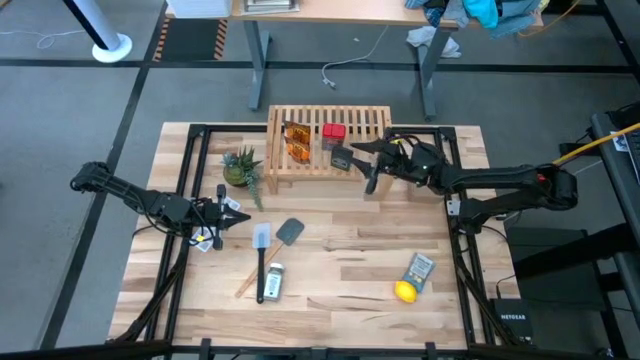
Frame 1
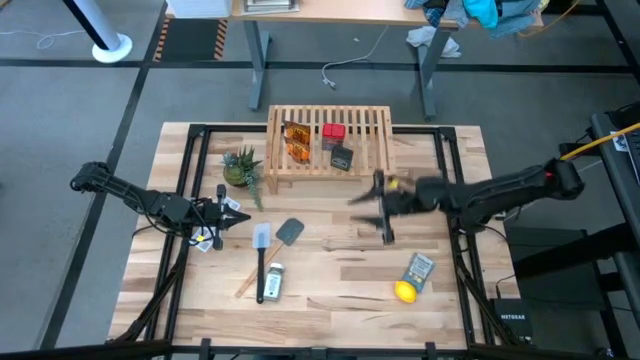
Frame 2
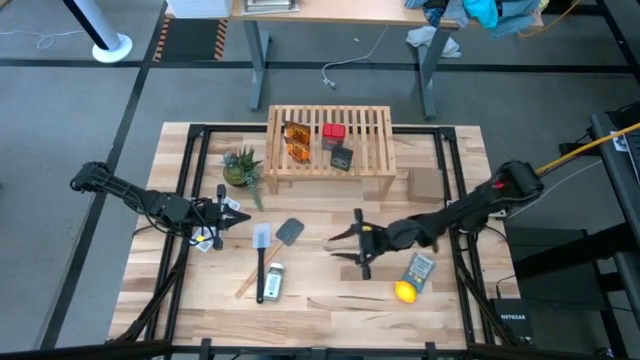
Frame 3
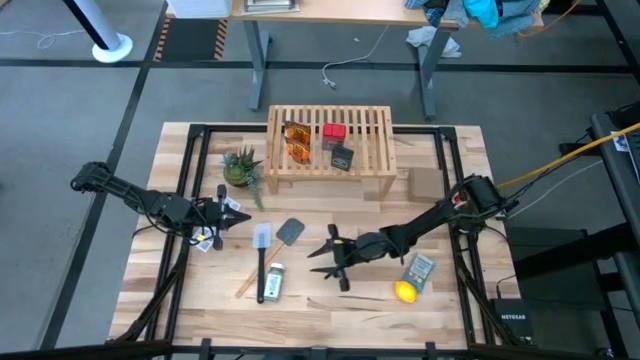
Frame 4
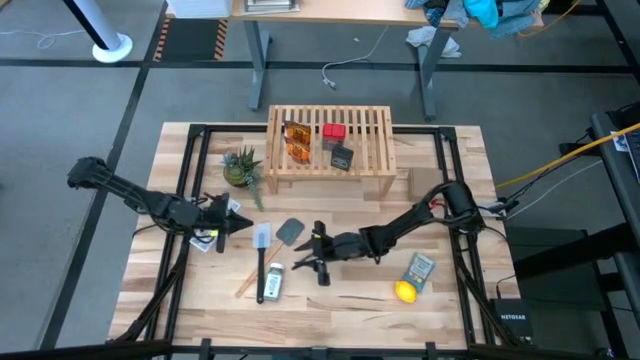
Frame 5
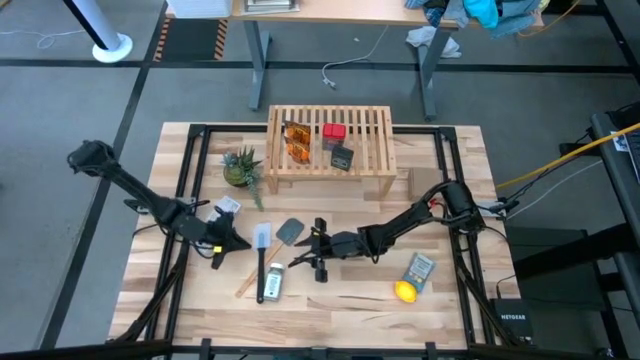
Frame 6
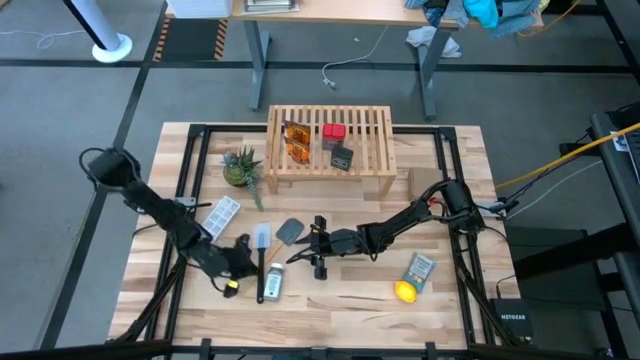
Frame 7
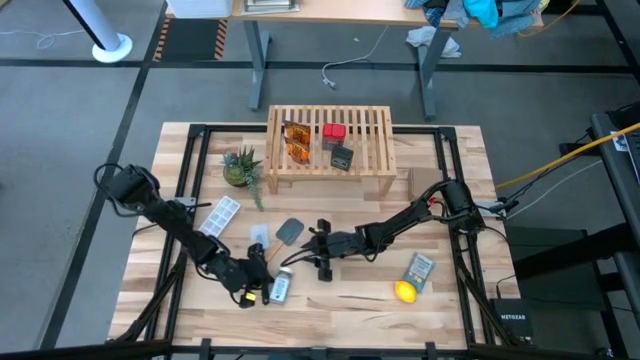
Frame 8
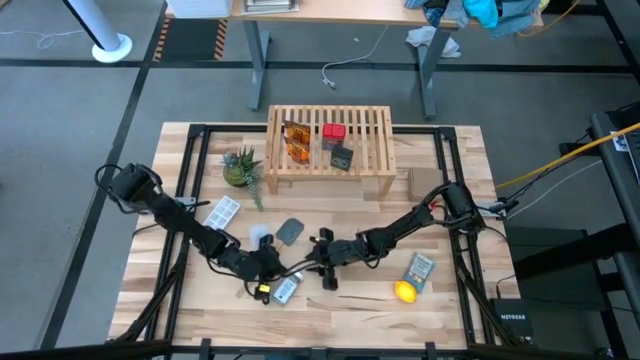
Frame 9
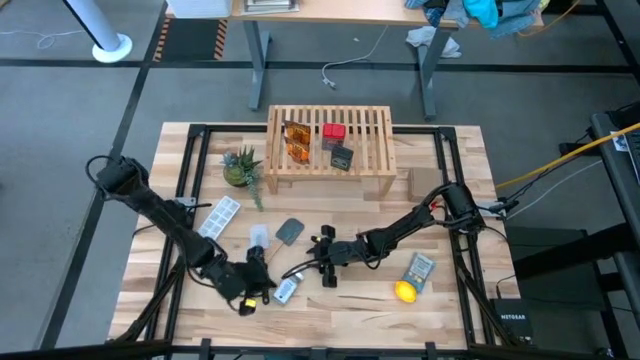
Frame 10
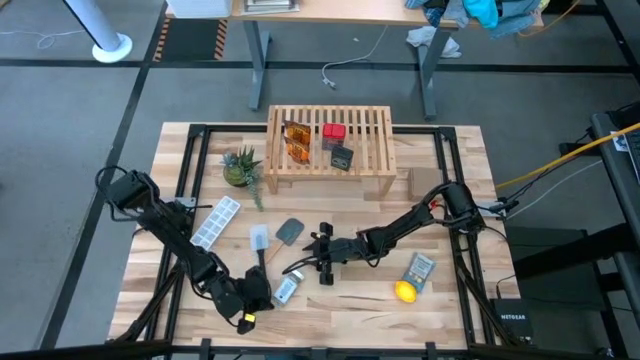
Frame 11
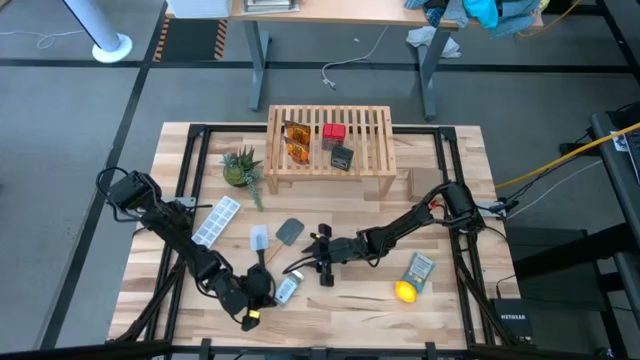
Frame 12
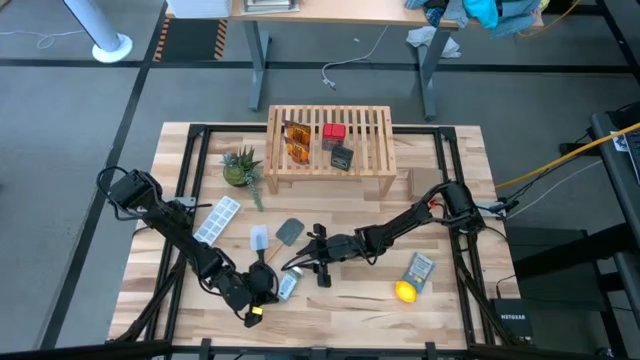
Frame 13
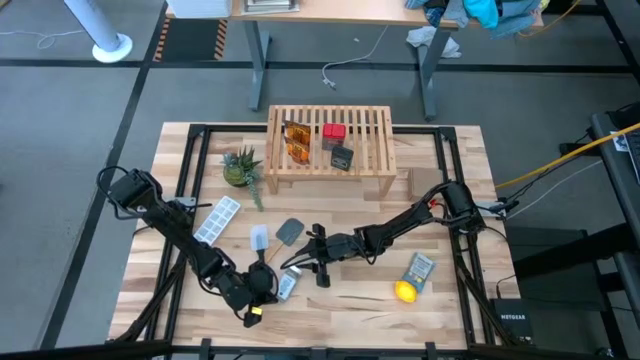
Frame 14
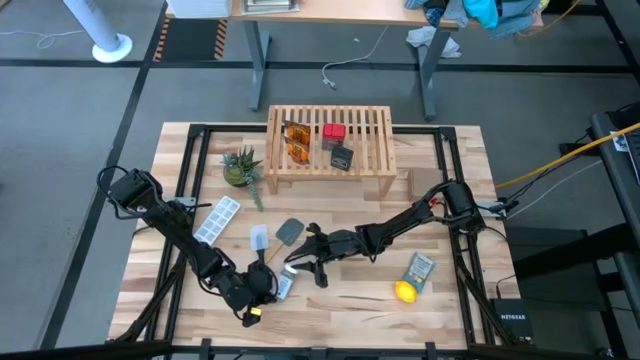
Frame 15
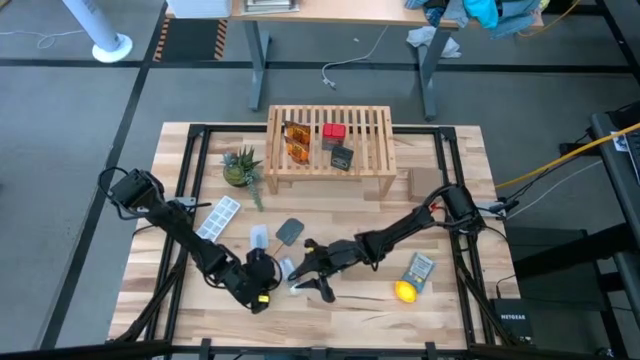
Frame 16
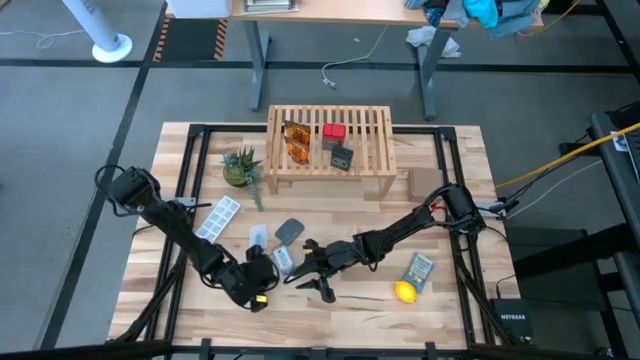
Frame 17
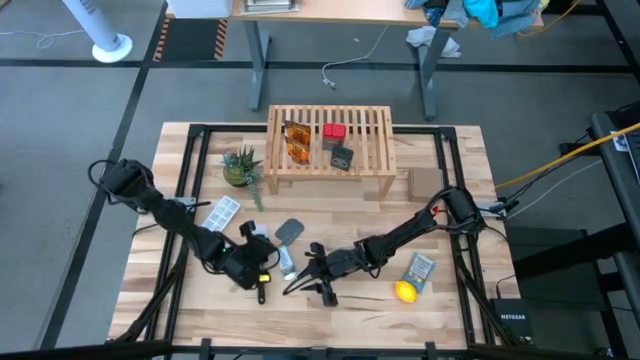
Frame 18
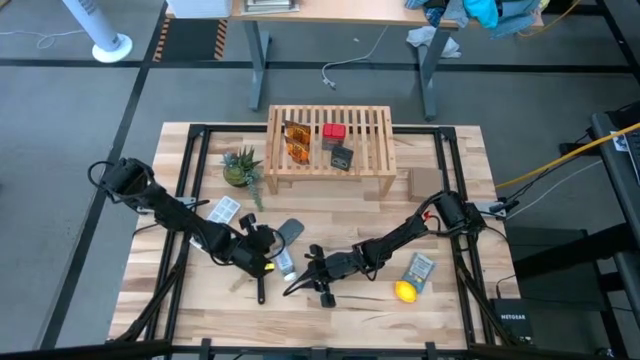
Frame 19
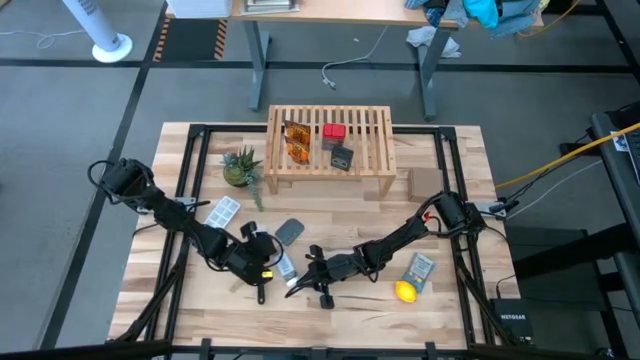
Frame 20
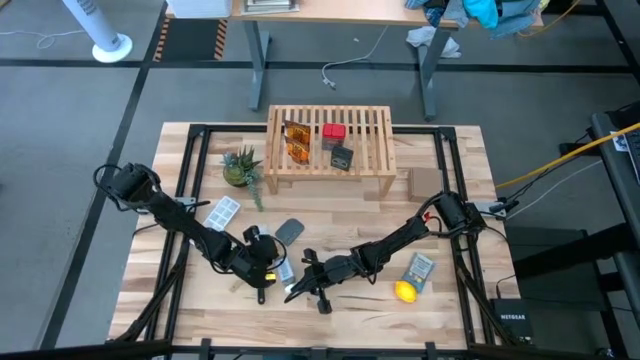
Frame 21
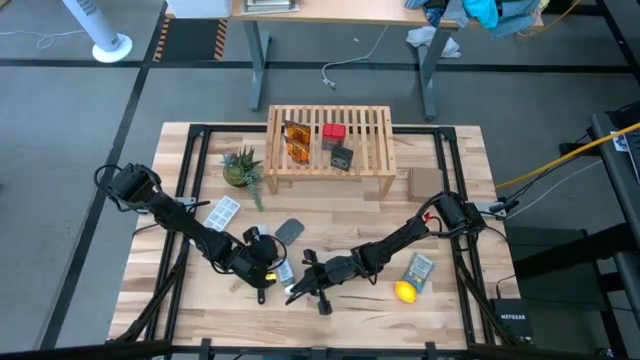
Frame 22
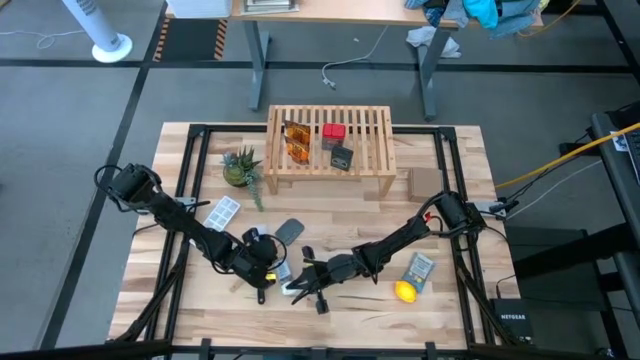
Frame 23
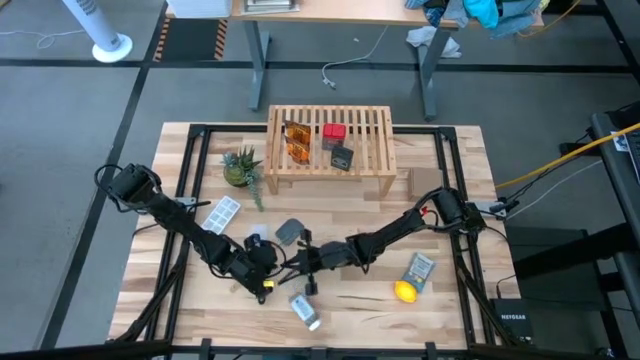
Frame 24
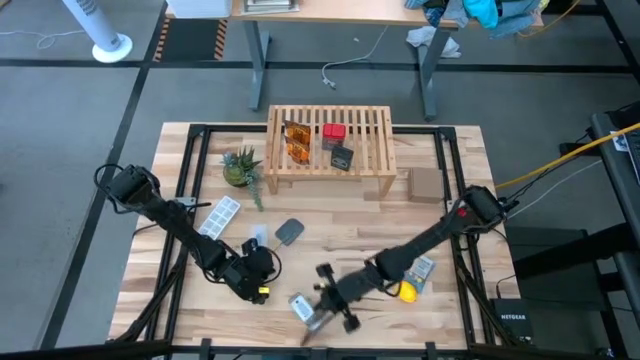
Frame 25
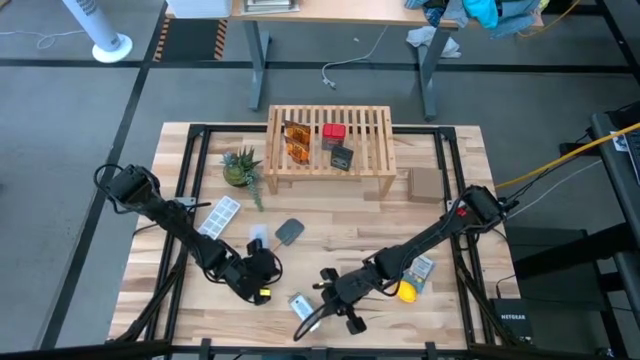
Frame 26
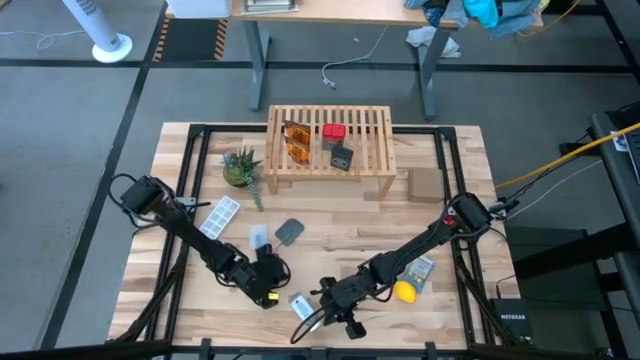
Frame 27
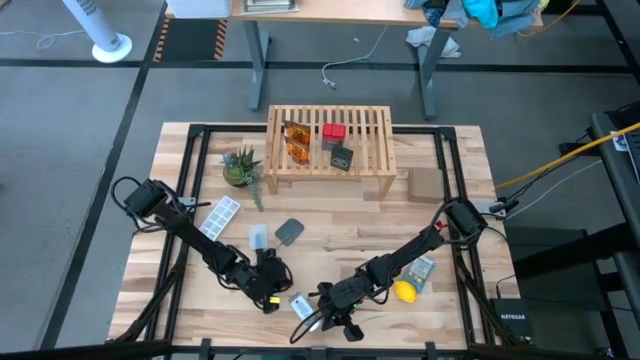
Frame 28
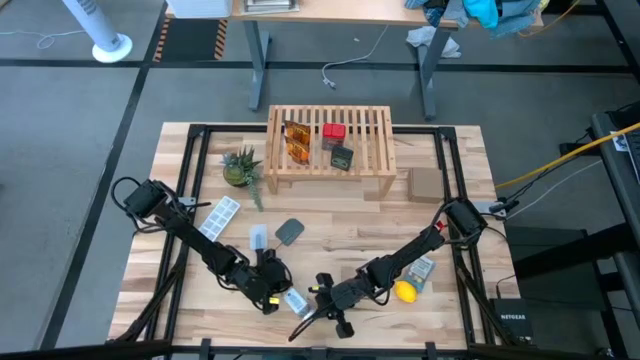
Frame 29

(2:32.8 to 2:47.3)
Task: Shelf spices
Put the white seasoning bottle on the shelf
